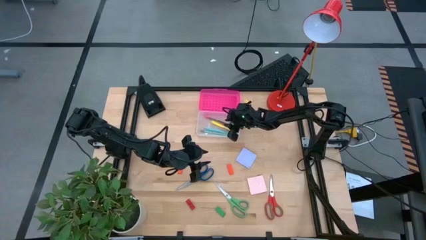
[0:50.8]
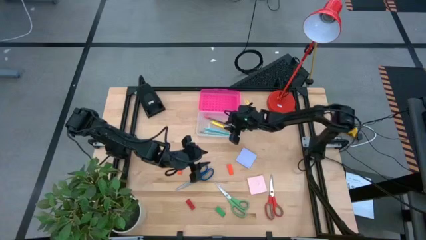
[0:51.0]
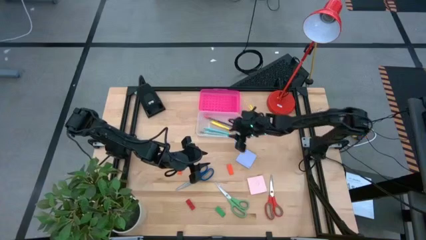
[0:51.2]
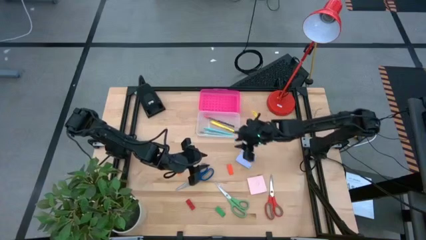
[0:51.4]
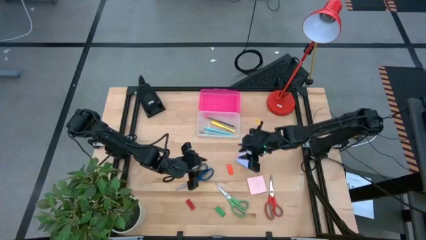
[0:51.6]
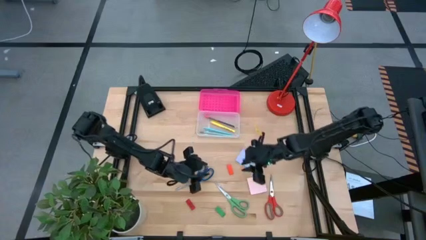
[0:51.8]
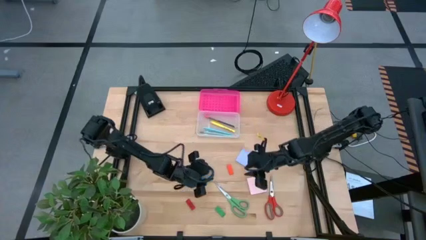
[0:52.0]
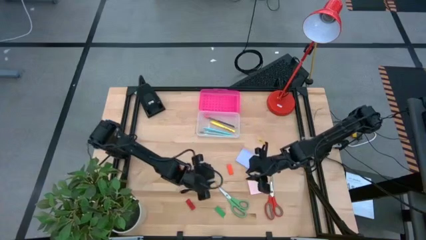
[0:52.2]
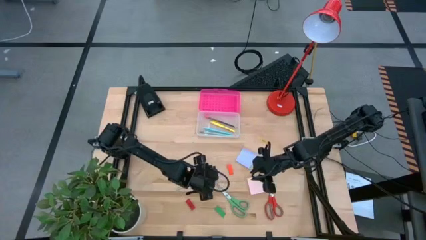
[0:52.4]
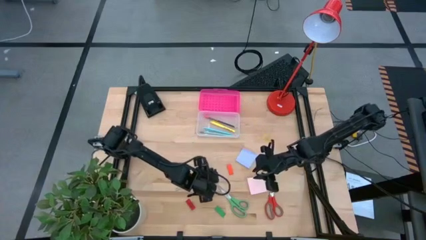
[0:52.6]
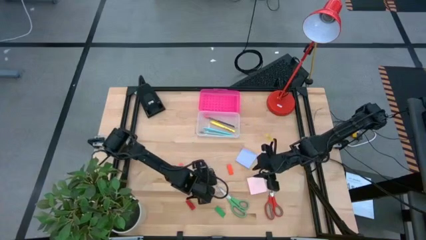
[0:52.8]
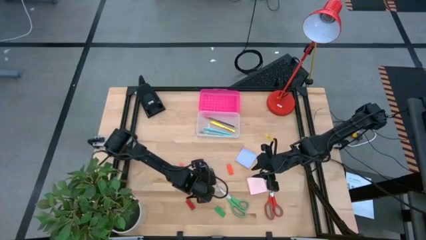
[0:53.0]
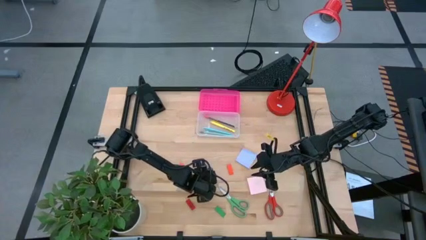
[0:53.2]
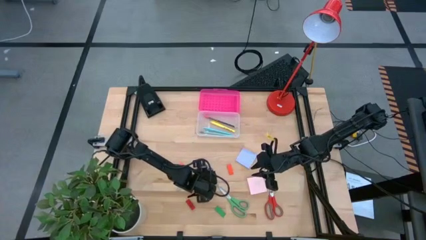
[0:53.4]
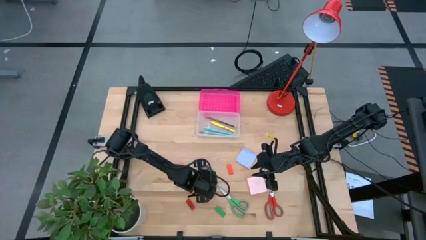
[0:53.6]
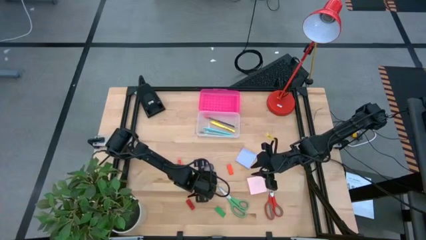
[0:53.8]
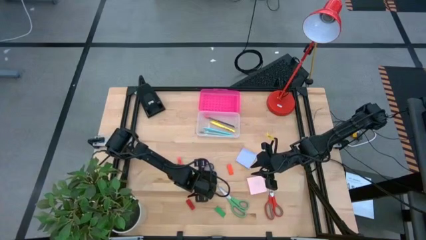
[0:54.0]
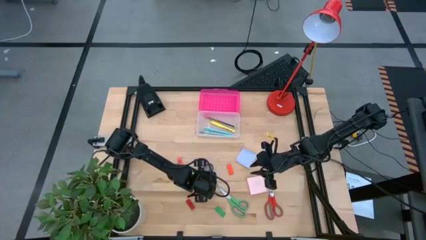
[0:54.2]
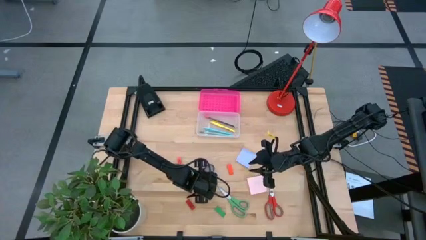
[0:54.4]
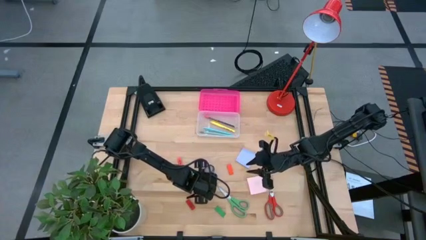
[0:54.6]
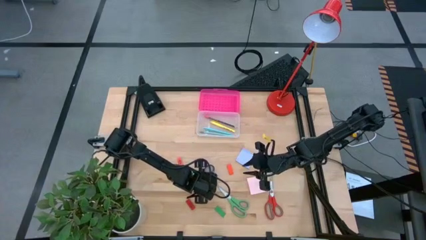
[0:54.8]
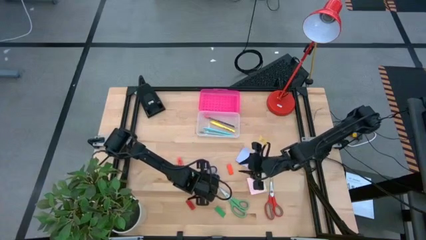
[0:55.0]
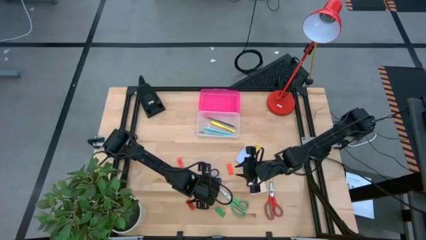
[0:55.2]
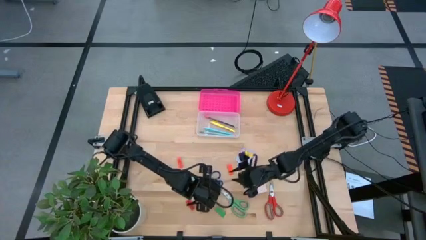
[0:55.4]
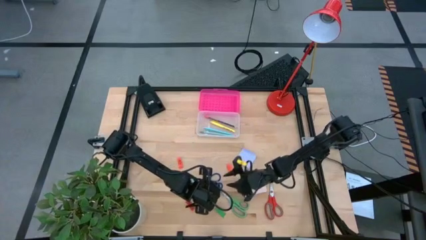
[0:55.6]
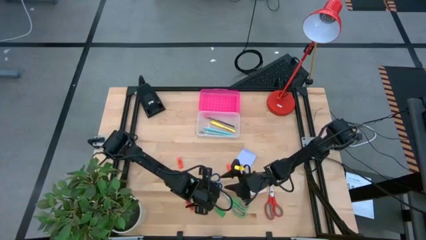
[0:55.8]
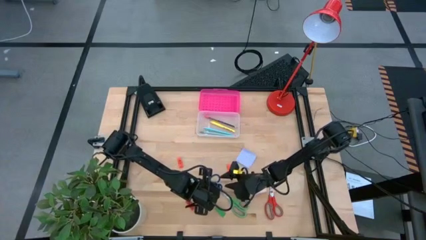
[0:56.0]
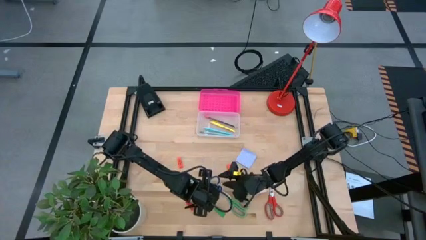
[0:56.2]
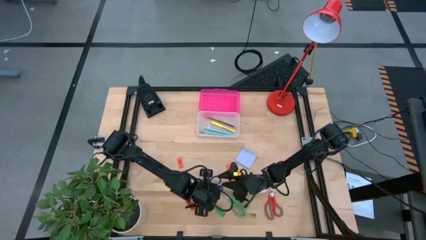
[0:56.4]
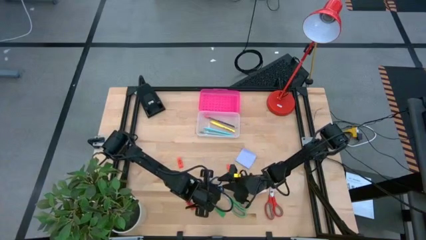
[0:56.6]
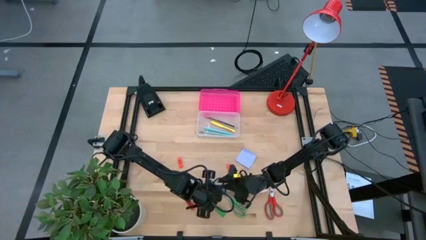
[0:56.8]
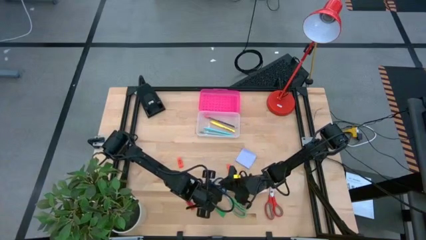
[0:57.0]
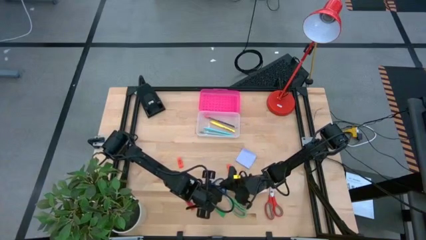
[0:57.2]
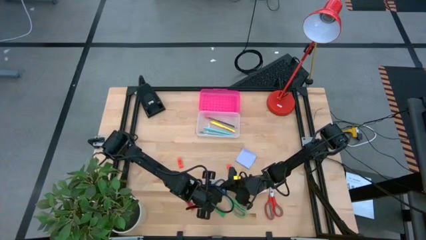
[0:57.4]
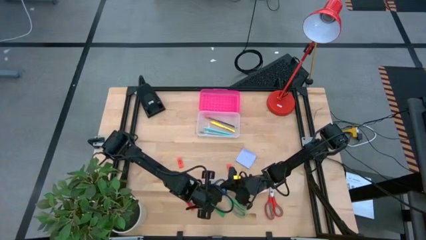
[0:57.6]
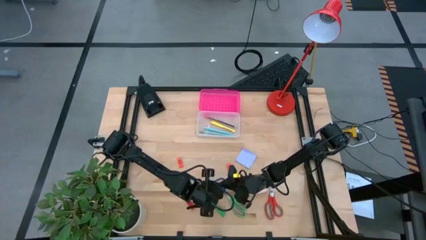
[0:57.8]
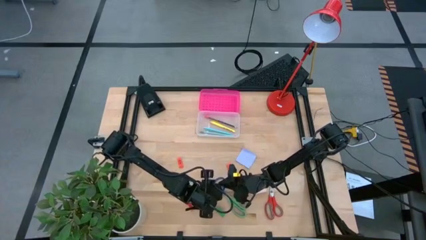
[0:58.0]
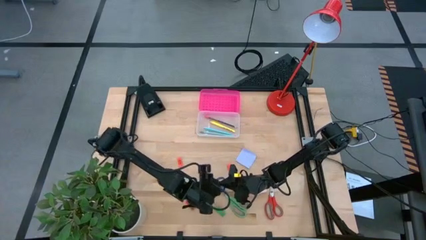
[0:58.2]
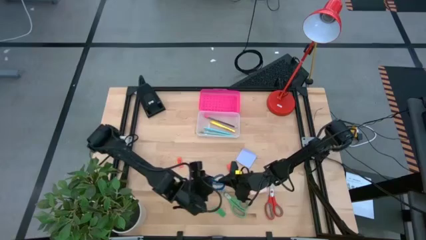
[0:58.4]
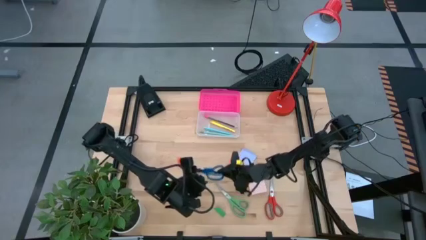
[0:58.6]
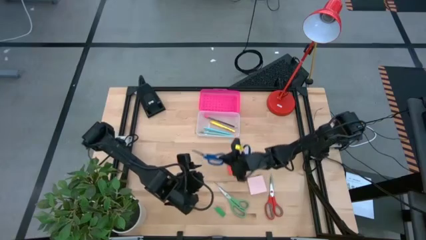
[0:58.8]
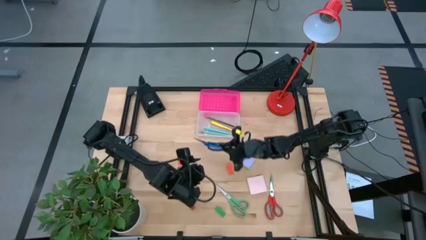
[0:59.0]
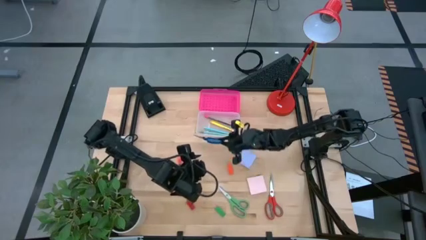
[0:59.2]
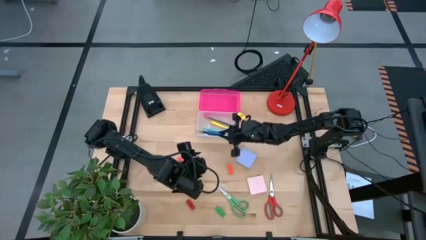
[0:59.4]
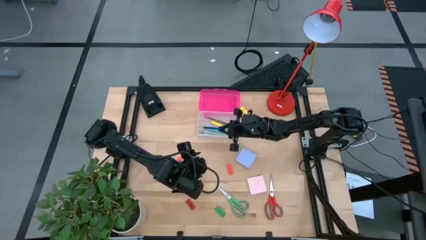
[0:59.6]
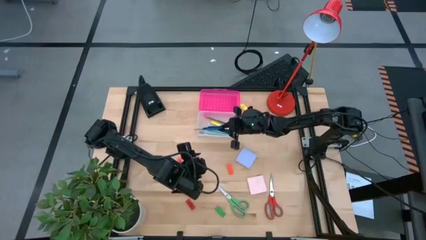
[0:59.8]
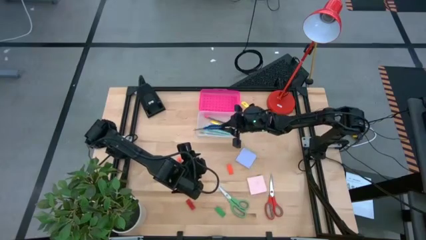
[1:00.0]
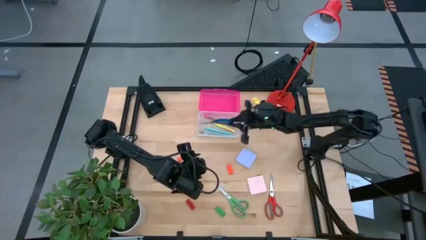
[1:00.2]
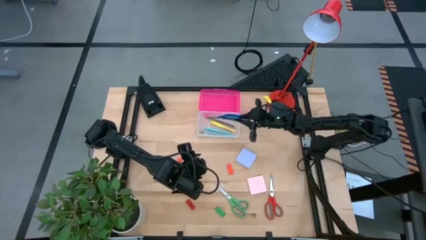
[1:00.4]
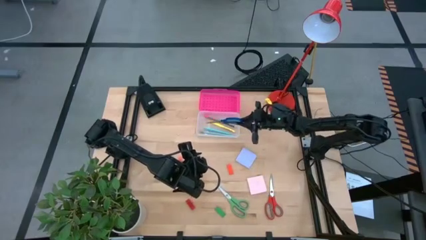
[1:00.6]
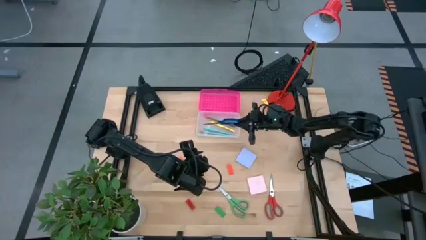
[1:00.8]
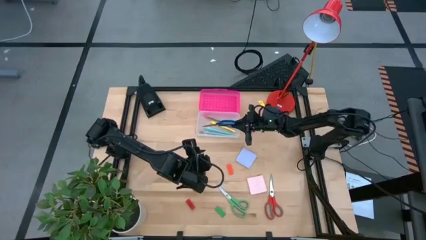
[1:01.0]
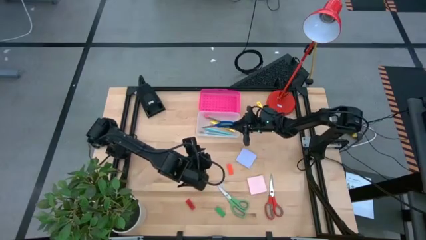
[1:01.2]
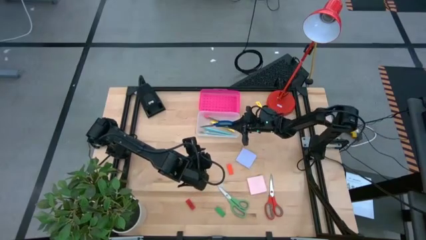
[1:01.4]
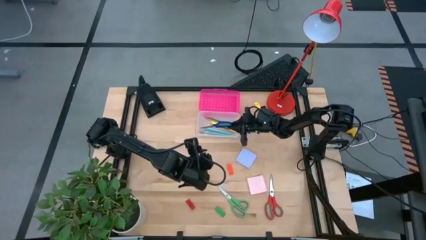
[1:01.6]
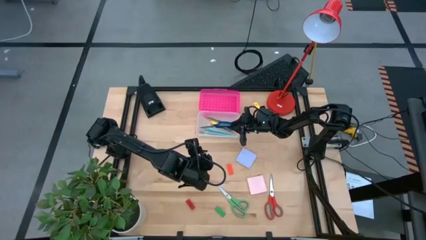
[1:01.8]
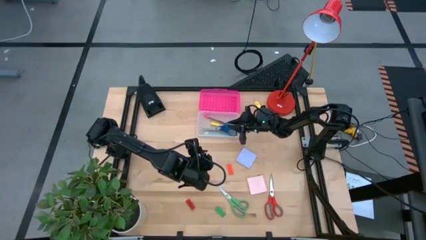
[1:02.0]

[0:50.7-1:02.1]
Task: Pack school essentials
Put the blue scissors into the supply box

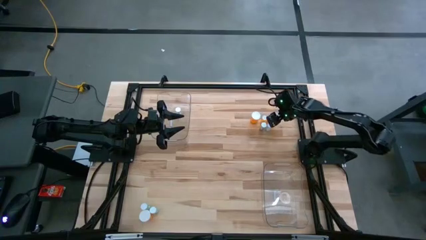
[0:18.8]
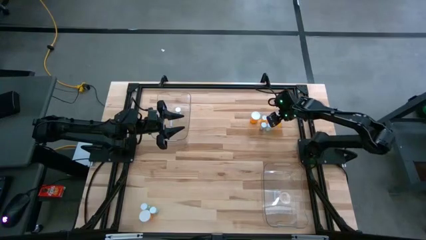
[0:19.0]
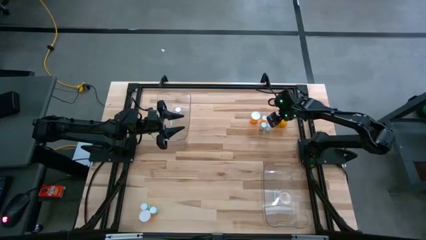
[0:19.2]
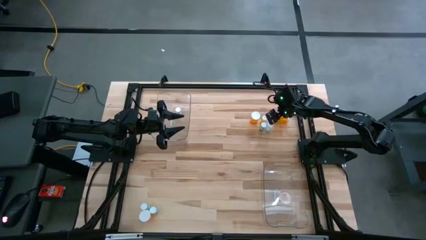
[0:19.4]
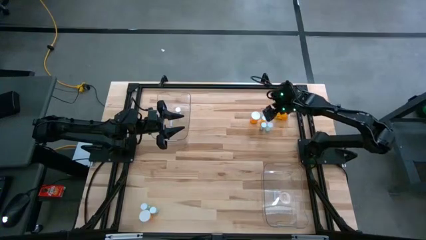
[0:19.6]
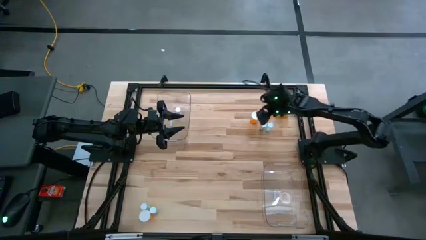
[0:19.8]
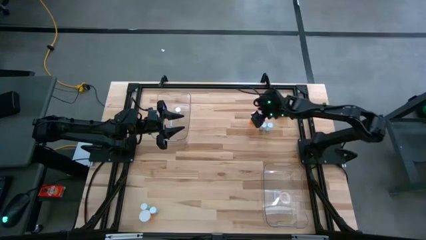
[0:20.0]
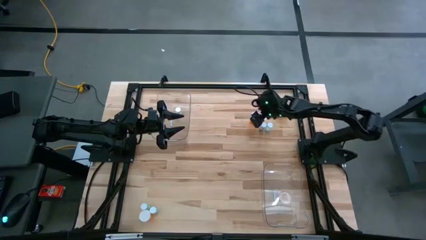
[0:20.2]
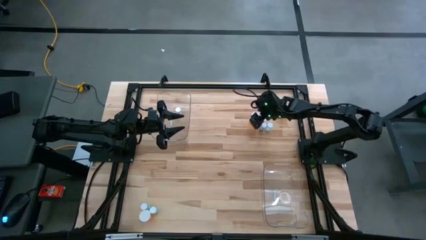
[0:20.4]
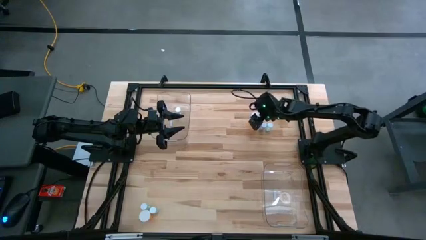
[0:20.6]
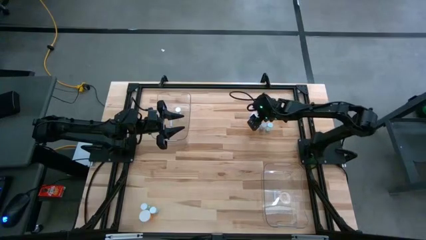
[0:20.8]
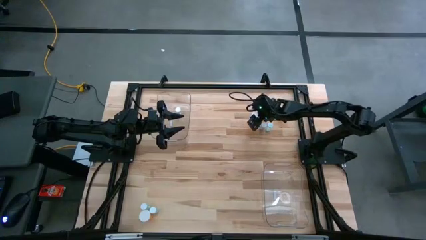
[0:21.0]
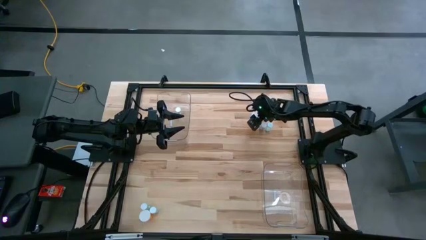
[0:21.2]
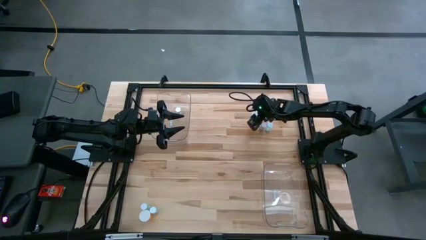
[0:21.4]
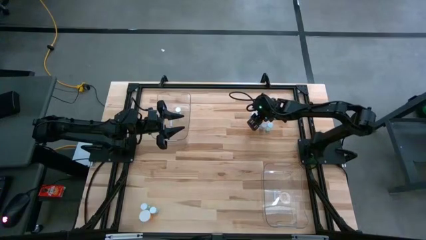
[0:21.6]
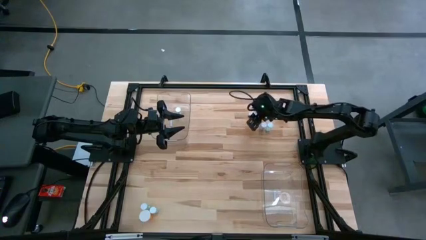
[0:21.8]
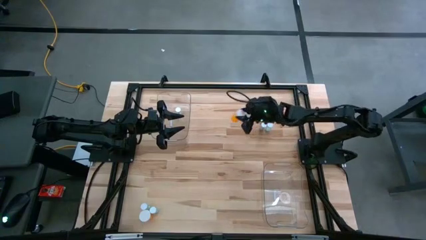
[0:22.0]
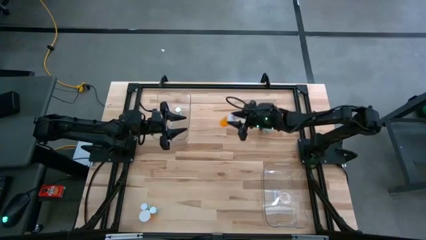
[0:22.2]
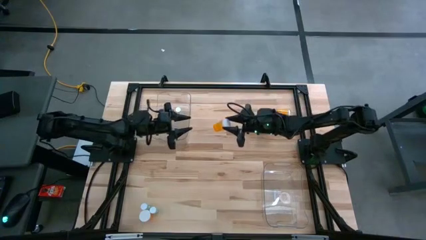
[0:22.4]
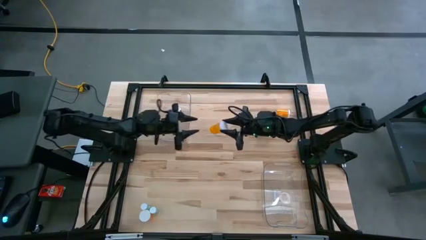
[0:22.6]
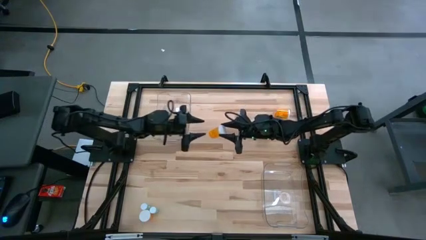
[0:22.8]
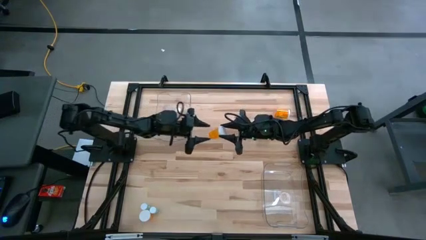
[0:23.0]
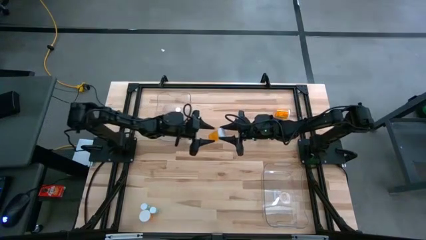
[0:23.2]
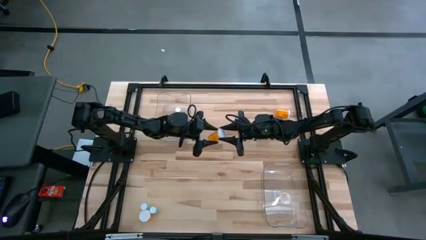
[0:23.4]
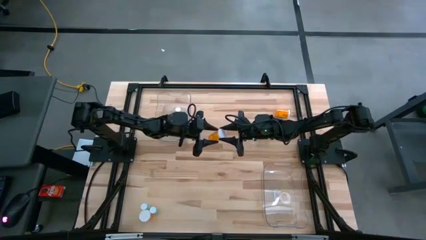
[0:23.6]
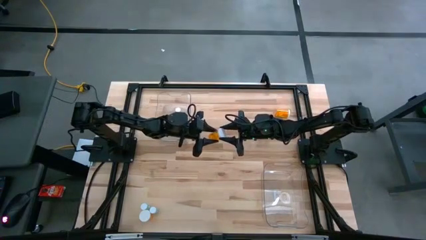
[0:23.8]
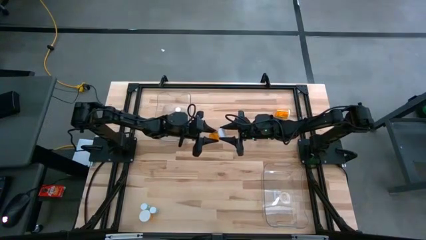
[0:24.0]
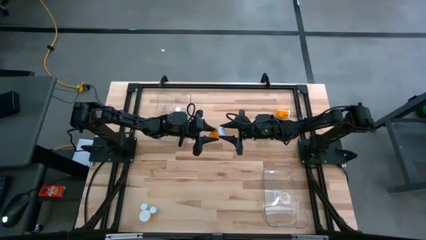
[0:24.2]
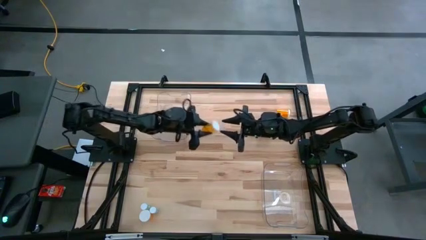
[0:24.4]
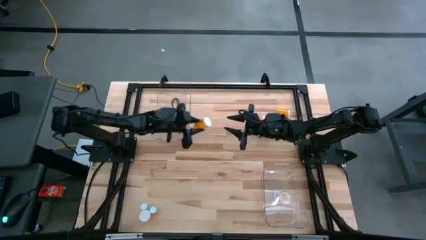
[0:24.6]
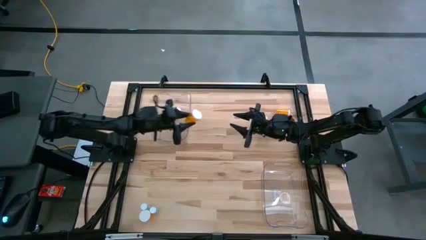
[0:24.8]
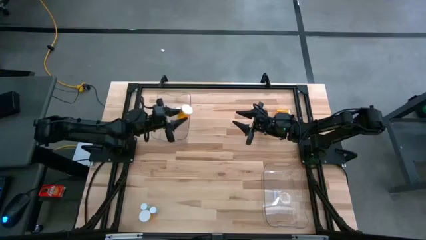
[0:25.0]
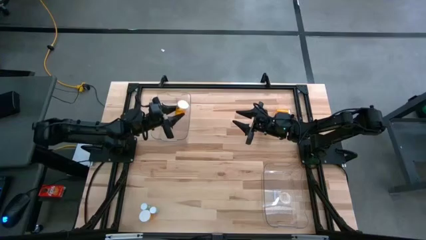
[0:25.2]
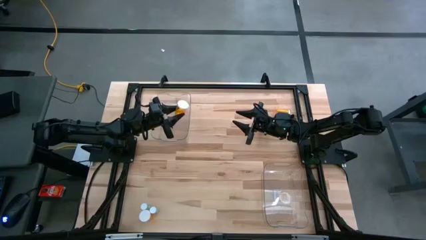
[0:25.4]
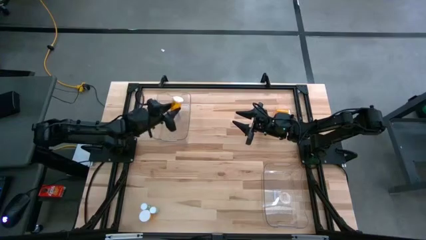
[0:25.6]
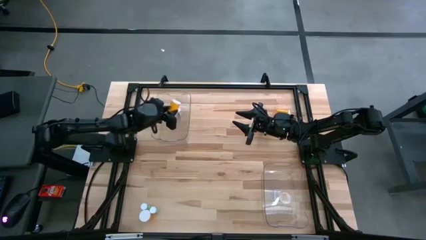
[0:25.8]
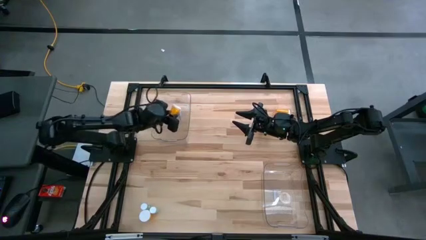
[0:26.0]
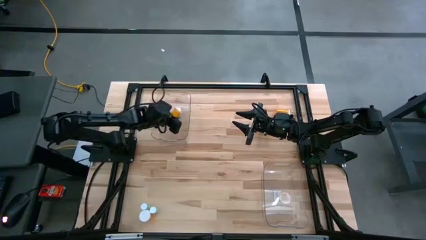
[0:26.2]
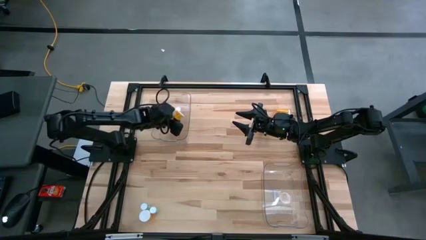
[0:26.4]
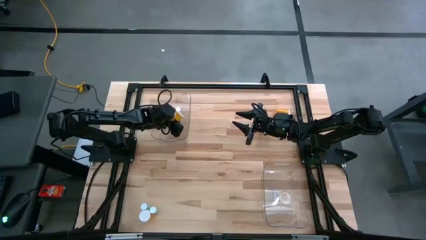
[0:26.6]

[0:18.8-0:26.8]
Task: Pick and place medicine bottles into bin by pill shape (circle, oval)
Put the orange capsule bottle into the left transparent bin
